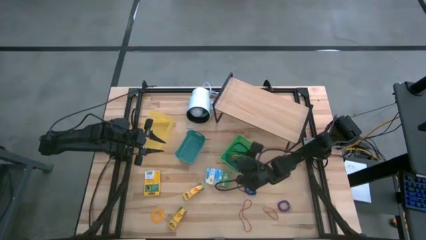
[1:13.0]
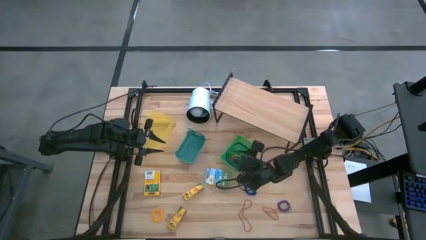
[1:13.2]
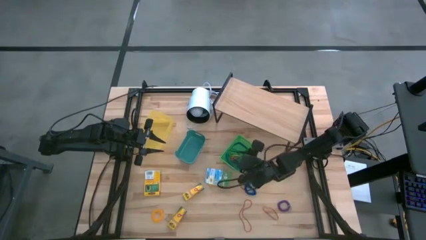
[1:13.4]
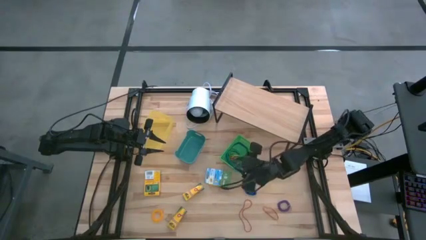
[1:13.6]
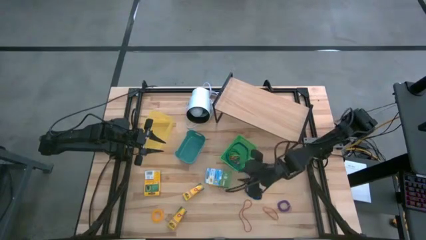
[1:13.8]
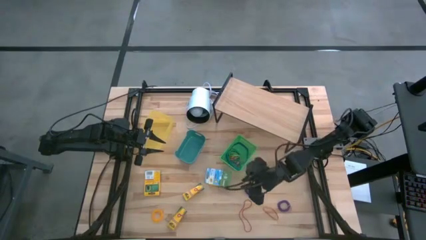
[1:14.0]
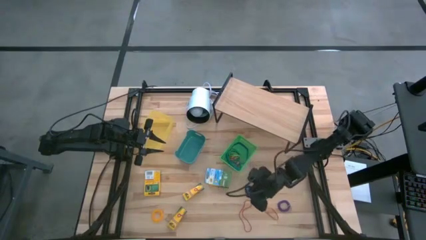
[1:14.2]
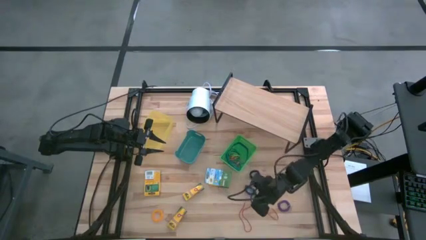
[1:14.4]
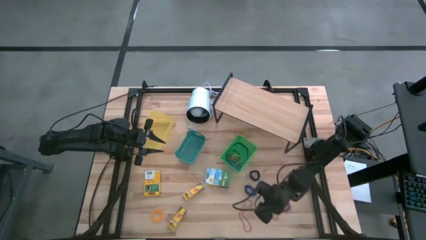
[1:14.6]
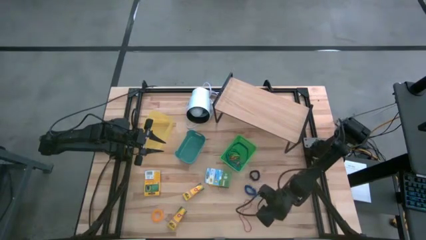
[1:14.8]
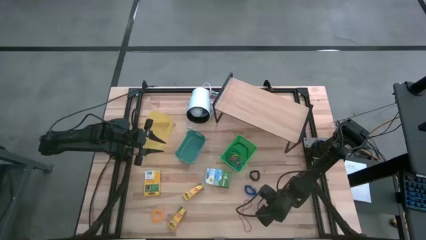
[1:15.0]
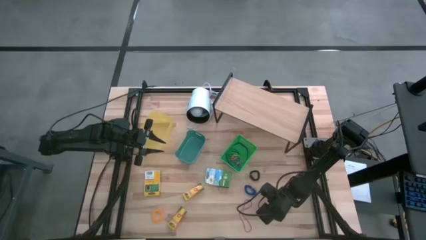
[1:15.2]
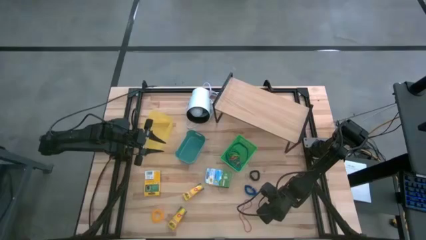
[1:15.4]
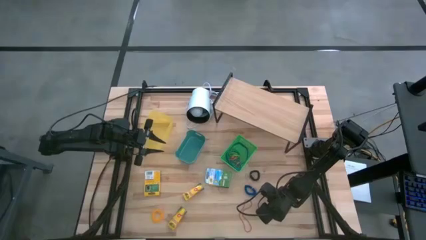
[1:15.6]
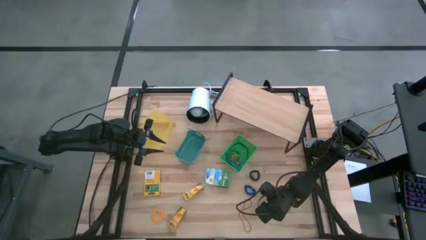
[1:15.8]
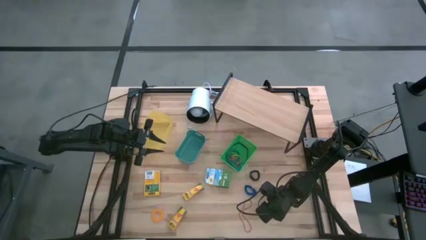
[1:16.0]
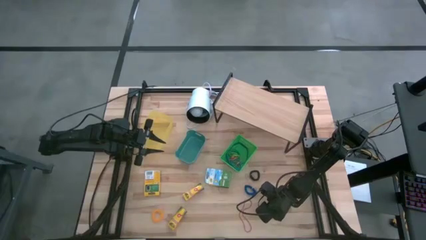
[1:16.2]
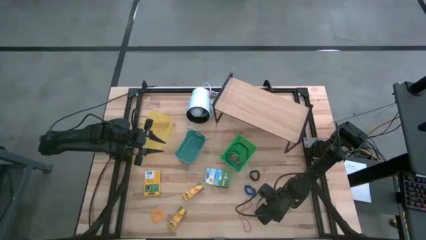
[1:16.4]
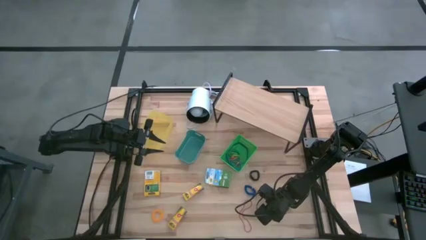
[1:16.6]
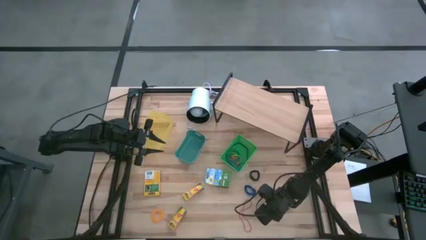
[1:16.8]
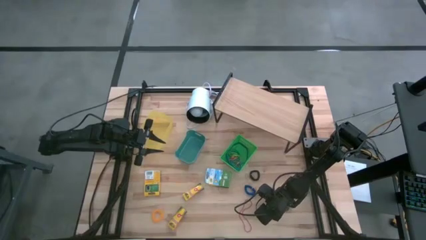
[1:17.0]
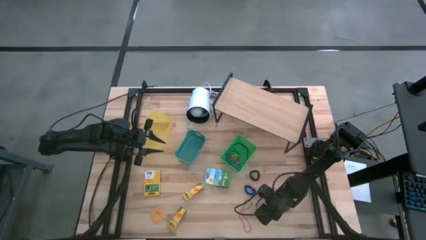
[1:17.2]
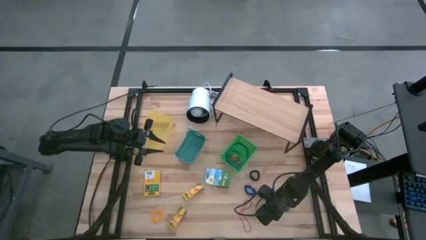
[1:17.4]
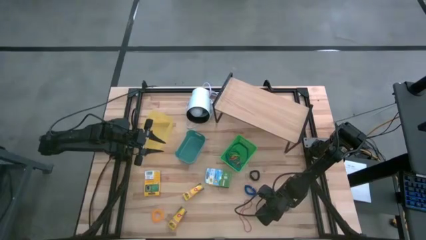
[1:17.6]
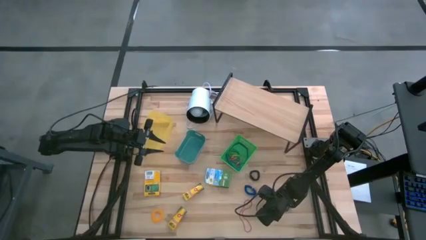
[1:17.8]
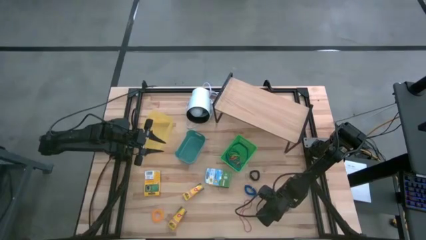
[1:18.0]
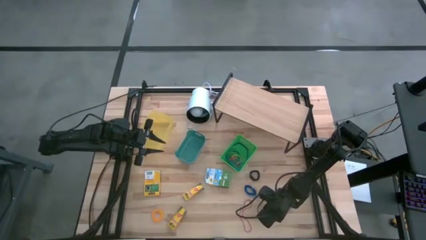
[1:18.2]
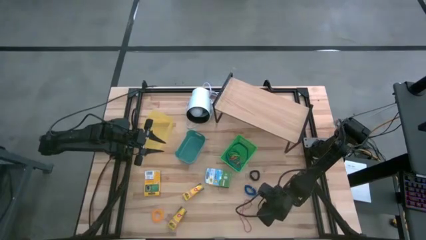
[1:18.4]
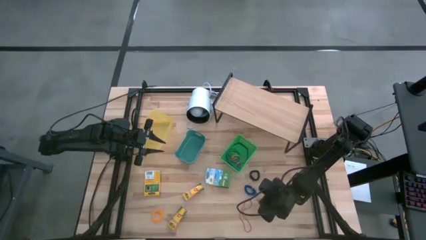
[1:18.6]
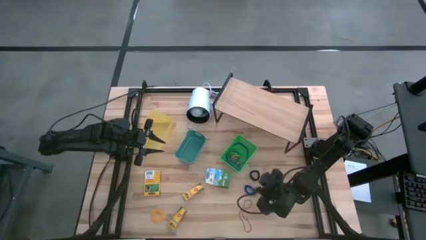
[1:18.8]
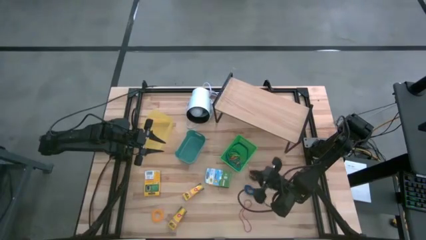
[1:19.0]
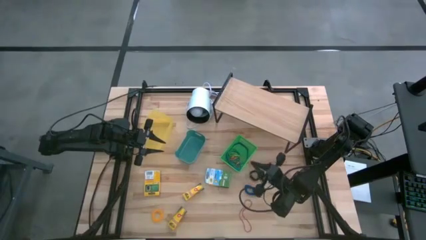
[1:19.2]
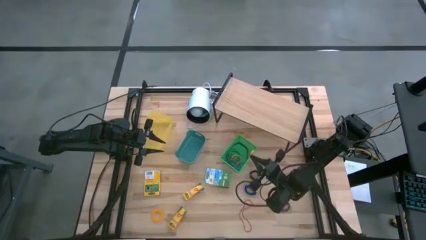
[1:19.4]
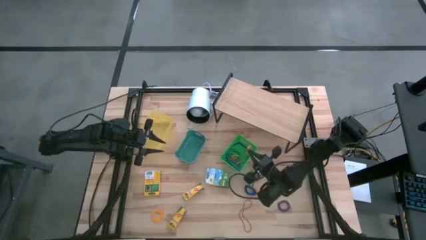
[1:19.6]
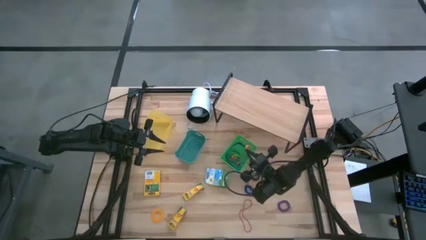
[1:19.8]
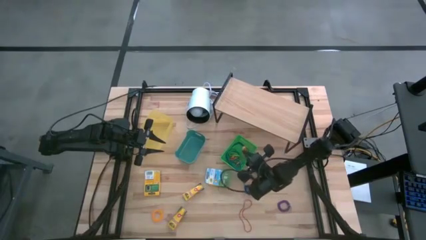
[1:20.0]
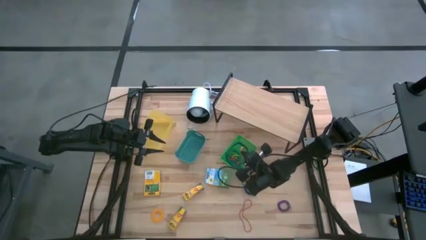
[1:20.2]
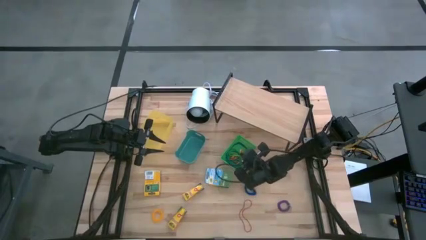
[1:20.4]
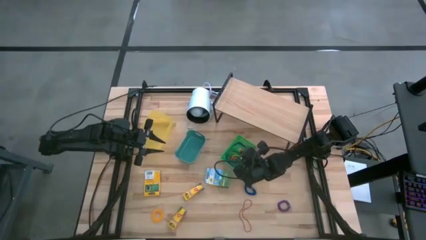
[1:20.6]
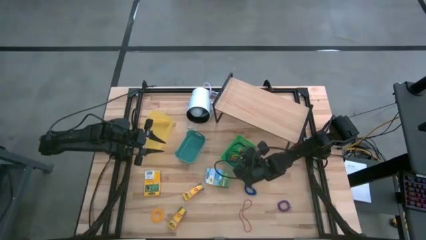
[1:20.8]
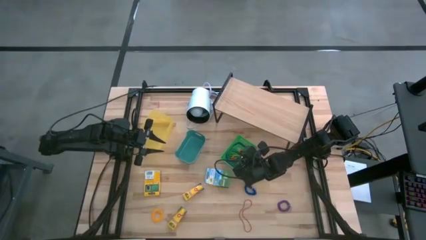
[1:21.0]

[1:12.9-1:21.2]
Task: Pick & Place Office Desk Supplies
Put the orange rubber band into the green bin

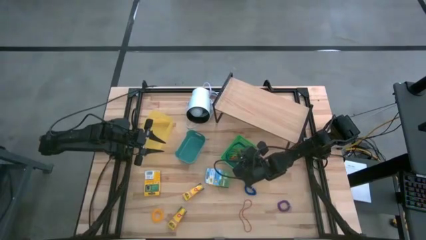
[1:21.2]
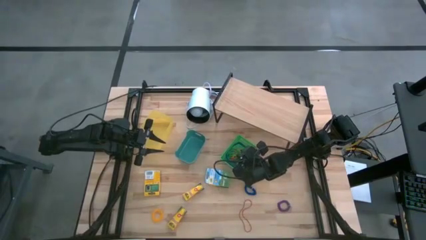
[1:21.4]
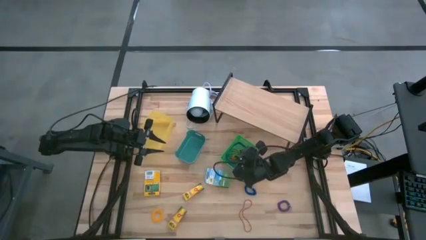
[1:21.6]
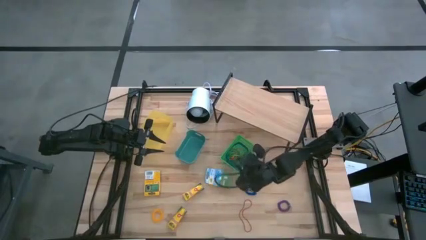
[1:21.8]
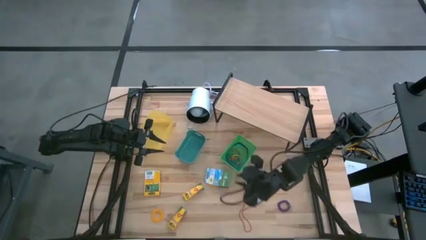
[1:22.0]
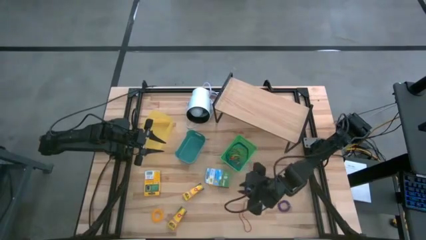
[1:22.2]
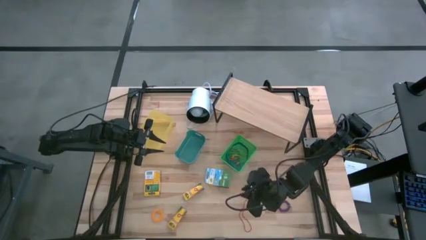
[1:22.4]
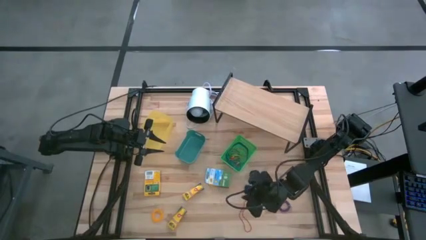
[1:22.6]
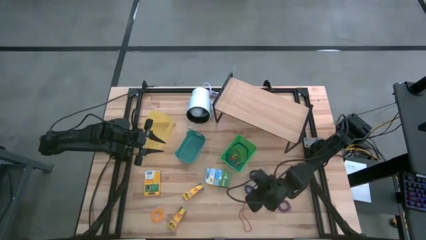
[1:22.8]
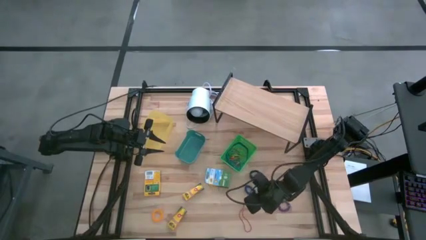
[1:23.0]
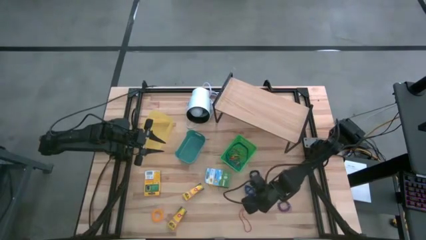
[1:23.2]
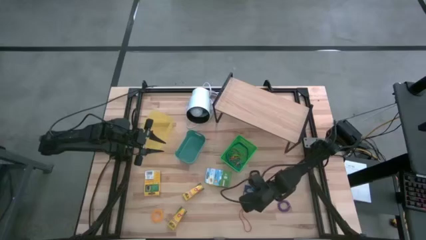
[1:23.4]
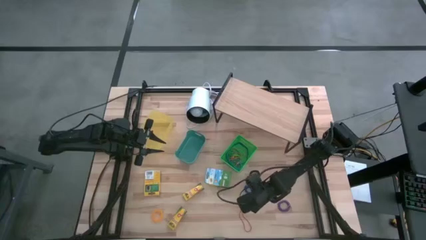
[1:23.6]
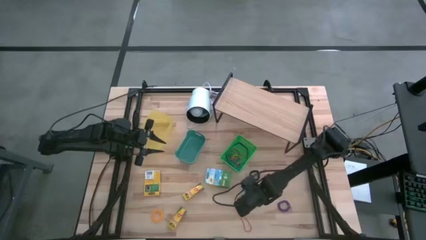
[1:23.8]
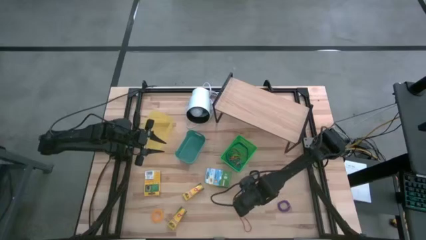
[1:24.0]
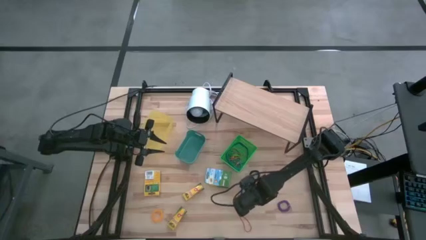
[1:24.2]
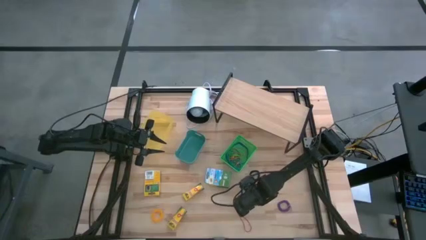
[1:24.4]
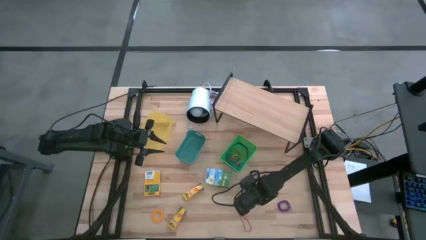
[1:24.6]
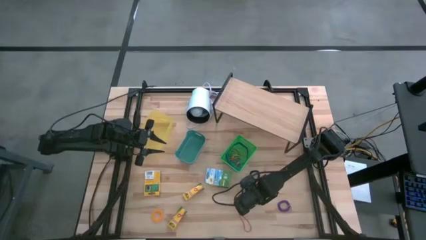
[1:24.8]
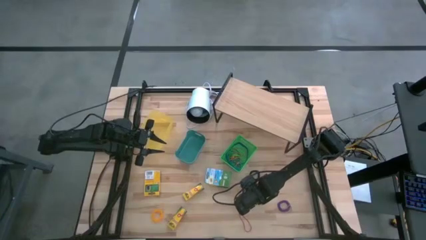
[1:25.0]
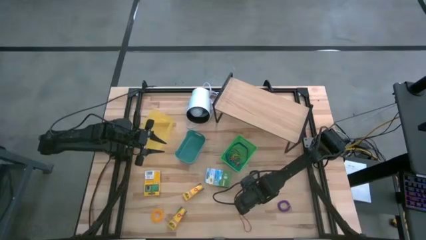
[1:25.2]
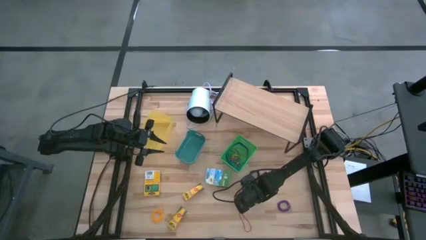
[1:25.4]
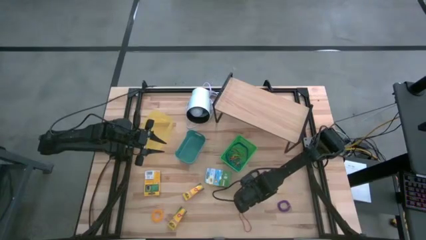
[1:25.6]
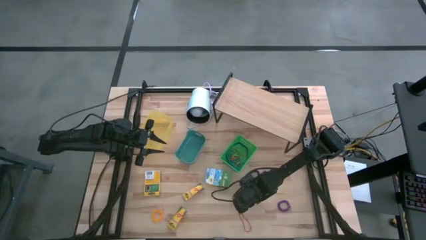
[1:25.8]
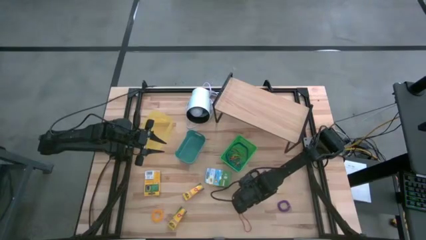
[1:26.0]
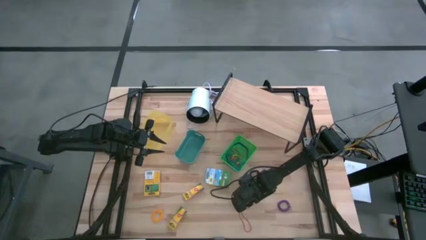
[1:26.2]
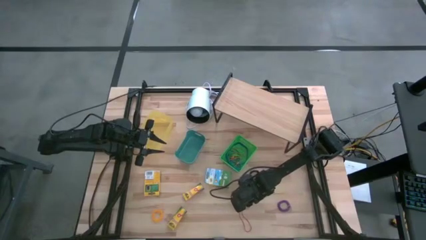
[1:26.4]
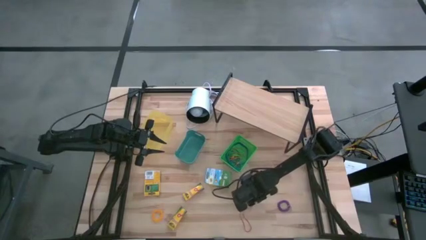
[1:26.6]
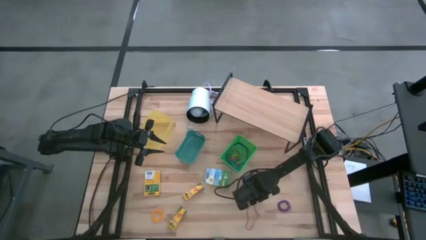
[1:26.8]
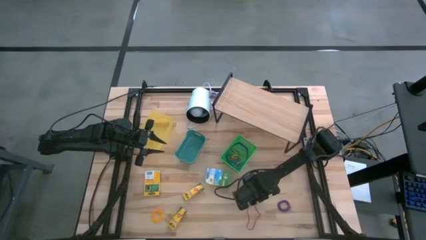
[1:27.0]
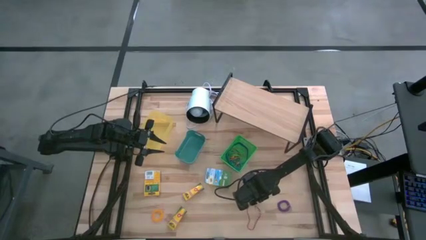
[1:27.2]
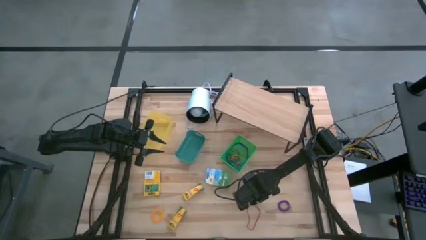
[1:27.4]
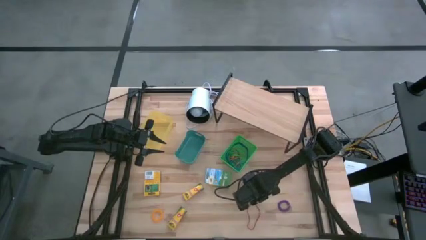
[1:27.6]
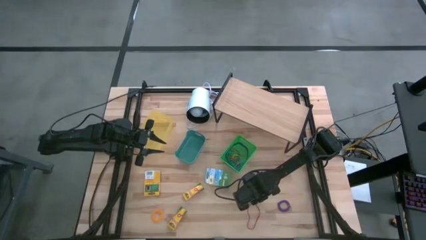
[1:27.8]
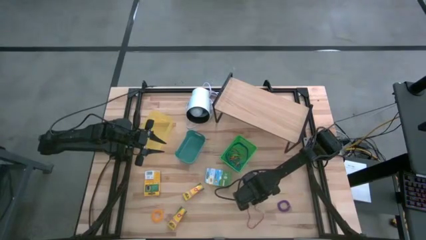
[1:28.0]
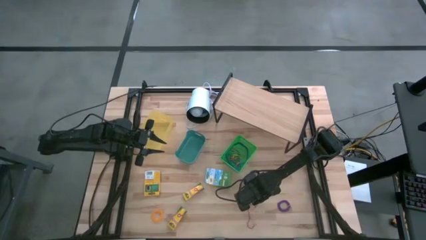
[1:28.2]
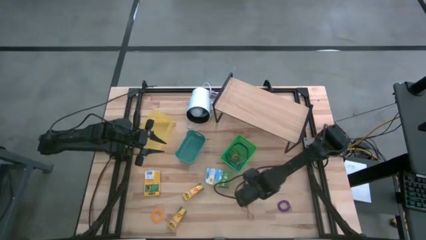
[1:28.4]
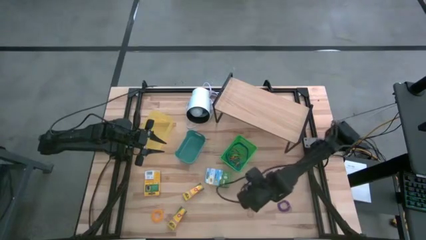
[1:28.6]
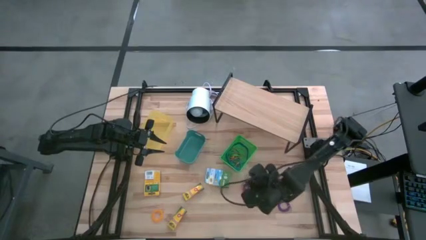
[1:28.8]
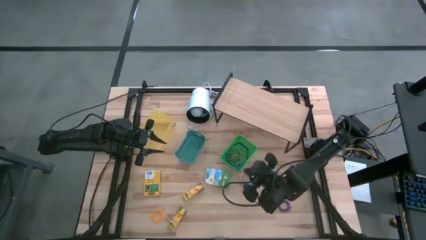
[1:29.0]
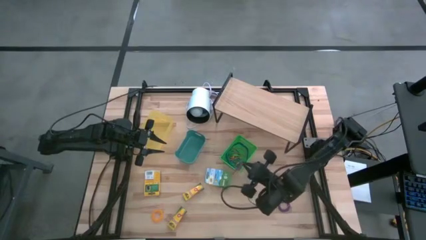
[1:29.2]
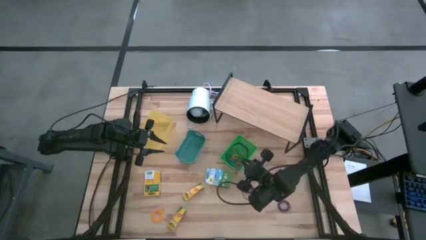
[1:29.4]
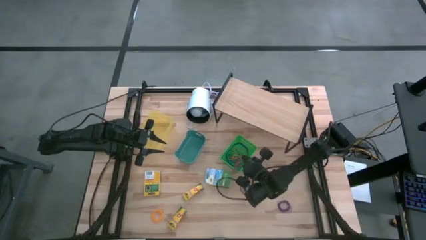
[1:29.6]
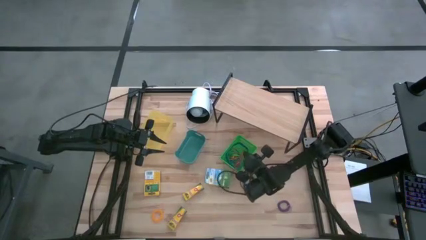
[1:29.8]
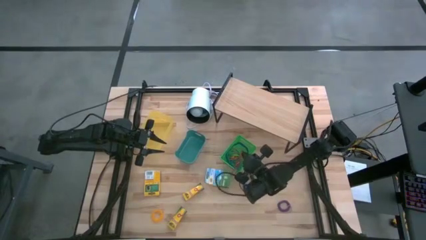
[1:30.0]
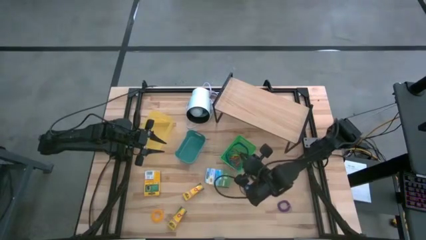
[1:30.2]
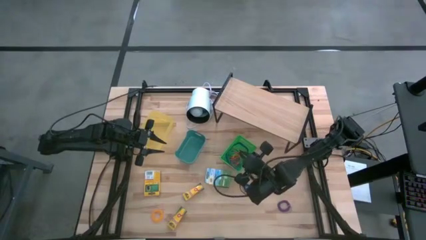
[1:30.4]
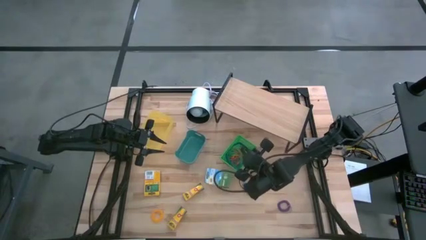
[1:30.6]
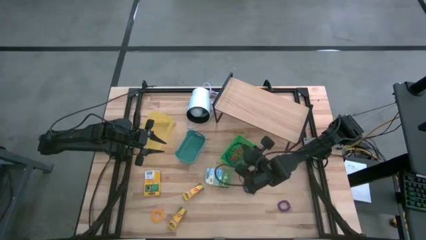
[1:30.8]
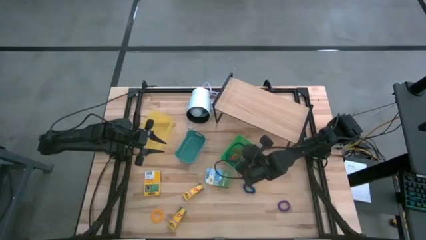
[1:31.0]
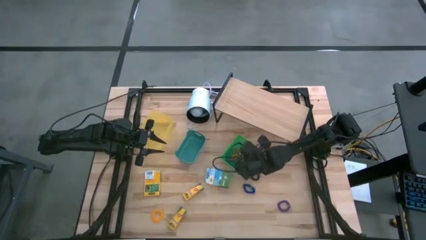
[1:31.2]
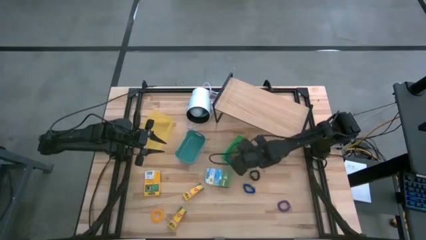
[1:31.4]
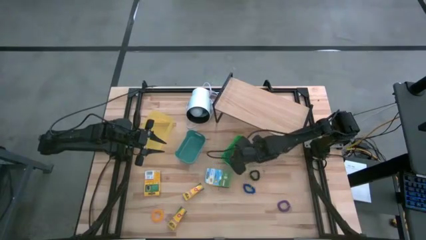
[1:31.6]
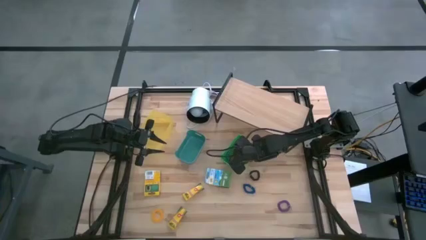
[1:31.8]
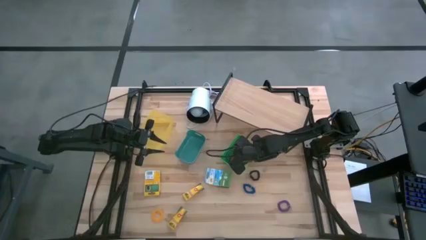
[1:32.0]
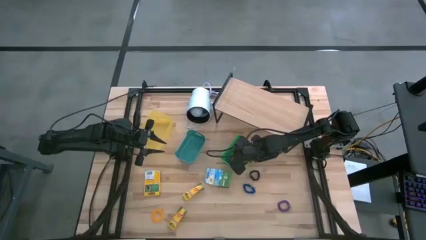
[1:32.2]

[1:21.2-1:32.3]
Put the red rubber band into the green bin
